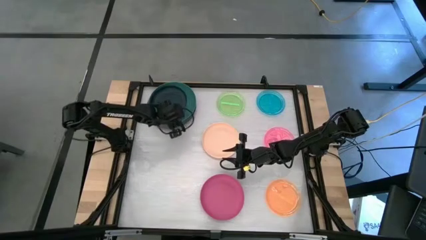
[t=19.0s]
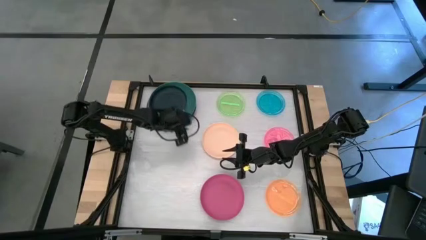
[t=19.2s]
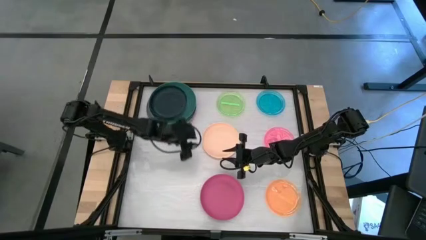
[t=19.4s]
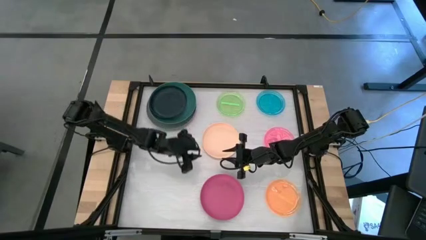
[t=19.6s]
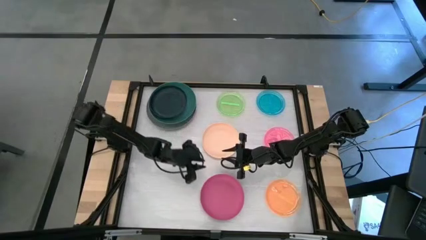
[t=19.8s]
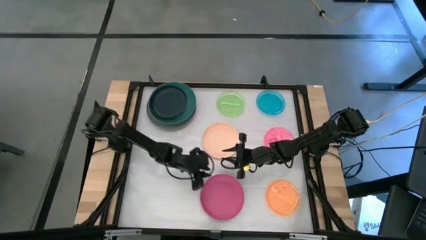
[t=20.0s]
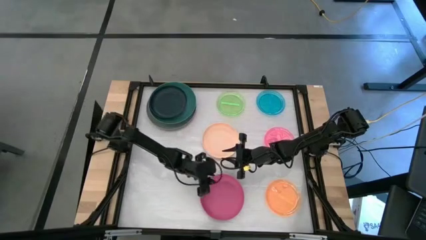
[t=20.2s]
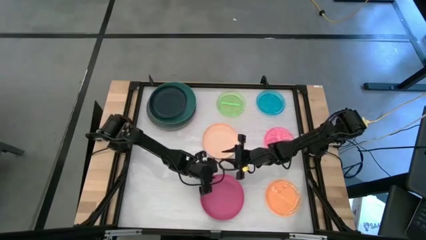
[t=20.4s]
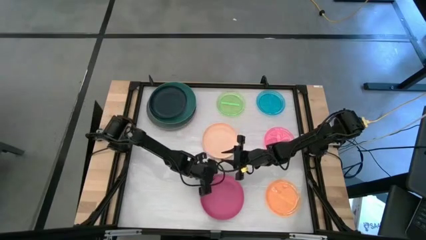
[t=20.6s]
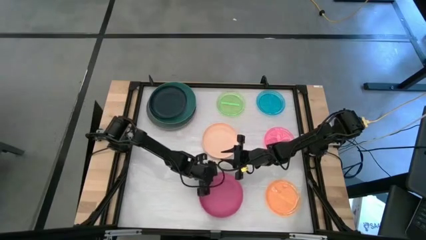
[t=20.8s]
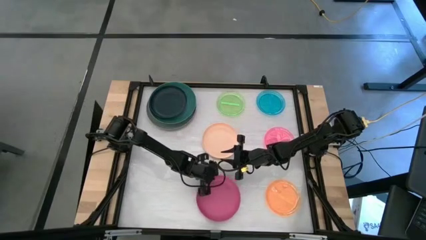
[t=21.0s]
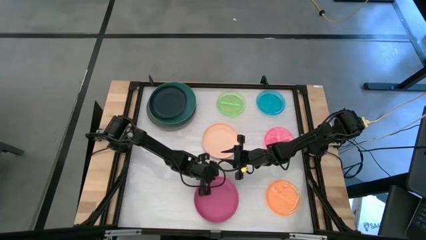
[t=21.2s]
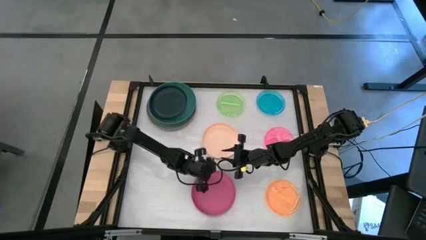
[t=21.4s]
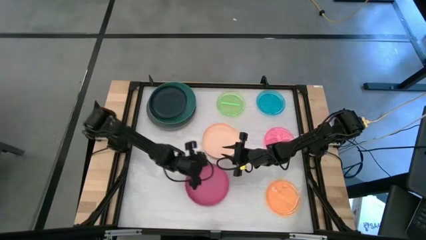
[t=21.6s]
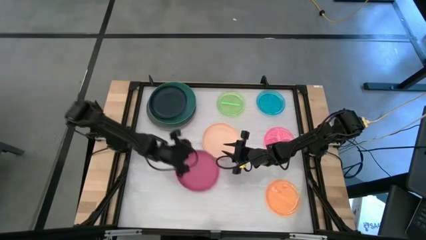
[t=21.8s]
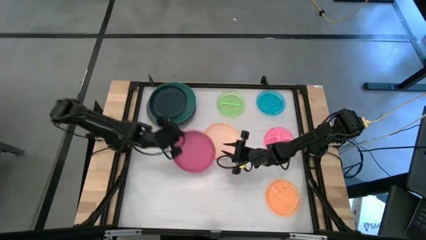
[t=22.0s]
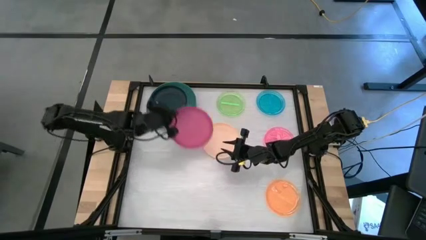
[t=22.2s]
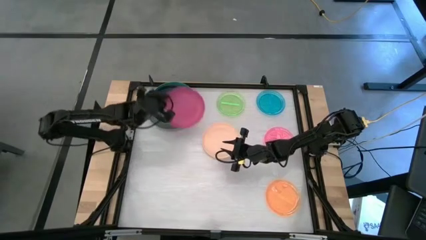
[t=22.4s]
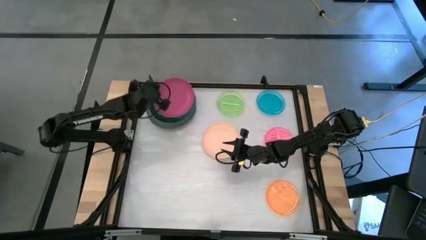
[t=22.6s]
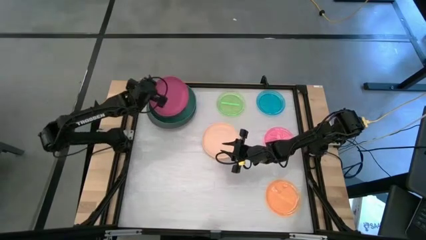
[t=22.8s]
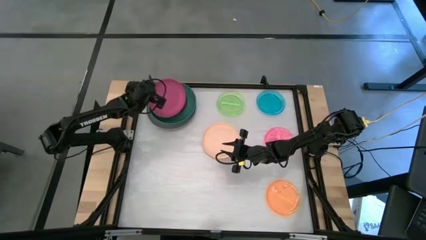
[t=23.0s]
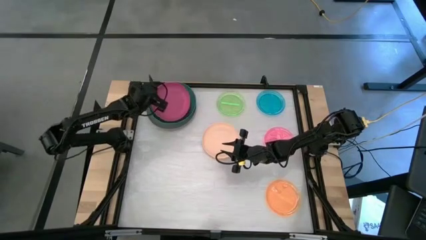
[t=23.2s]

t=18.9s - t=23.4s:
Task: Stack plastic plates
Stack the pink plate on the black plate

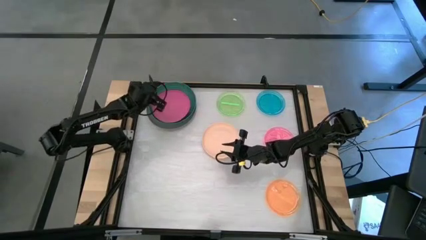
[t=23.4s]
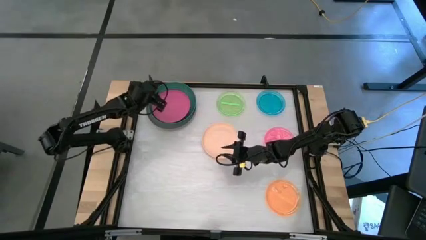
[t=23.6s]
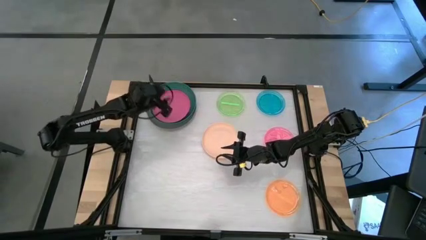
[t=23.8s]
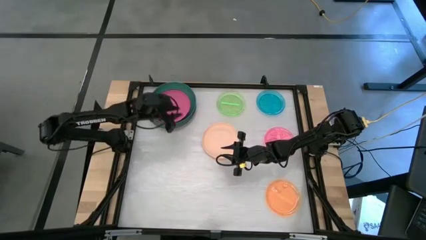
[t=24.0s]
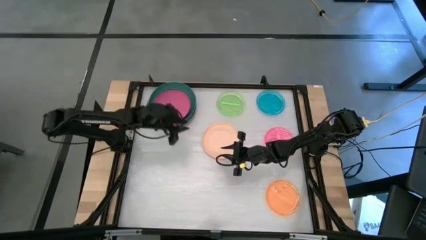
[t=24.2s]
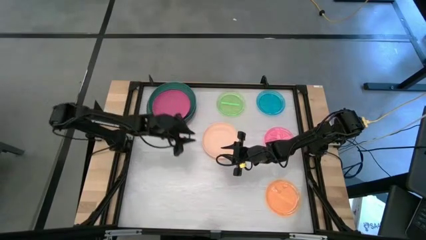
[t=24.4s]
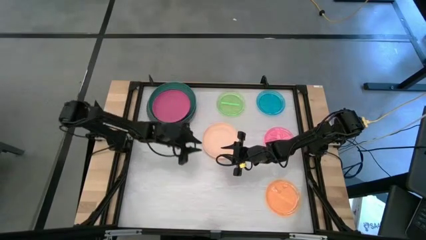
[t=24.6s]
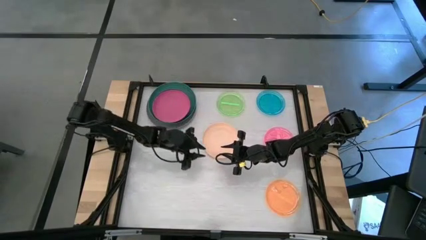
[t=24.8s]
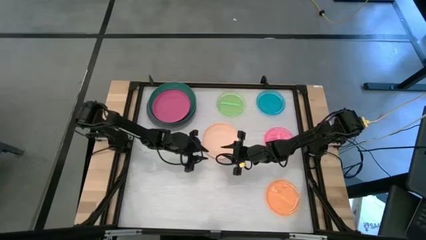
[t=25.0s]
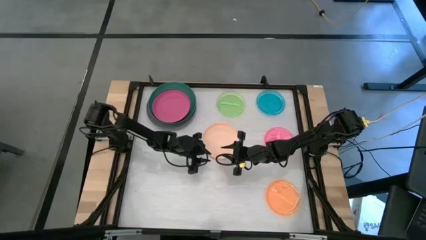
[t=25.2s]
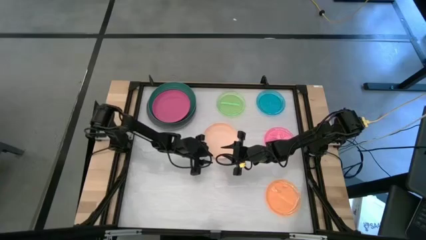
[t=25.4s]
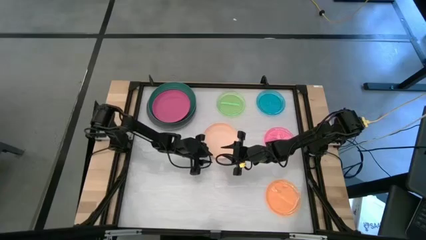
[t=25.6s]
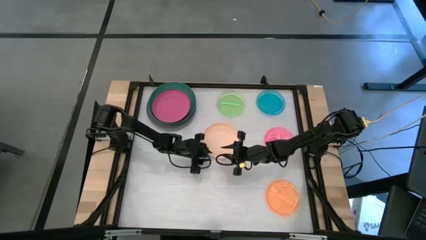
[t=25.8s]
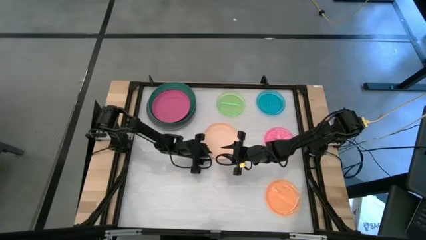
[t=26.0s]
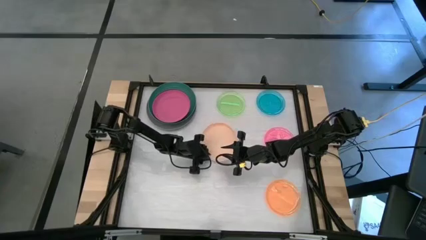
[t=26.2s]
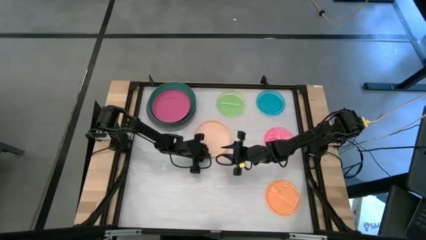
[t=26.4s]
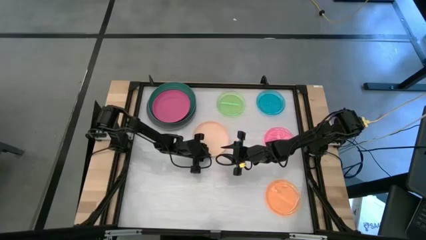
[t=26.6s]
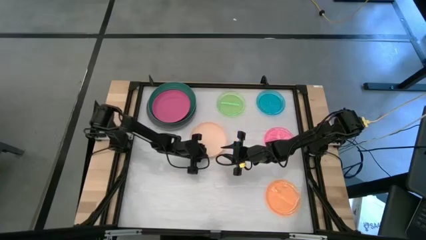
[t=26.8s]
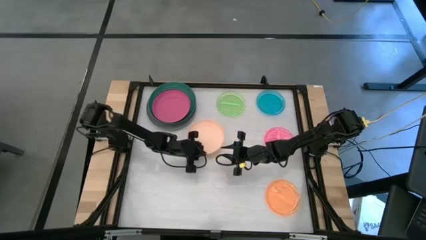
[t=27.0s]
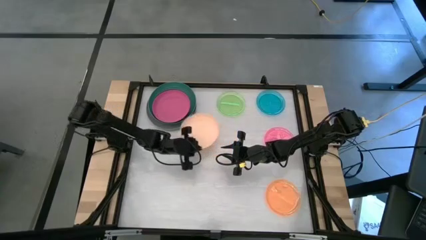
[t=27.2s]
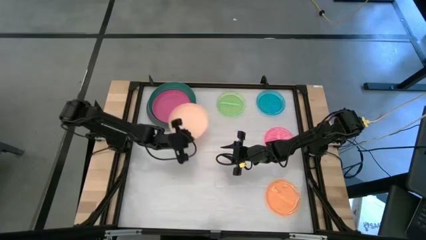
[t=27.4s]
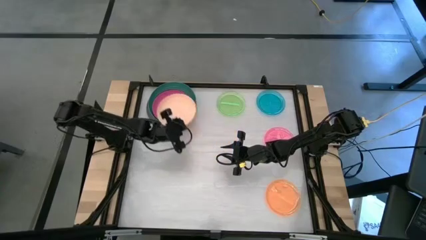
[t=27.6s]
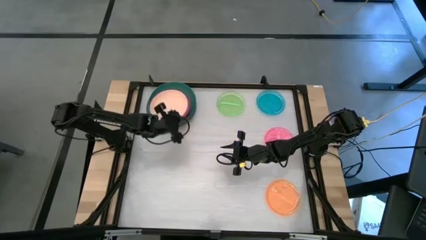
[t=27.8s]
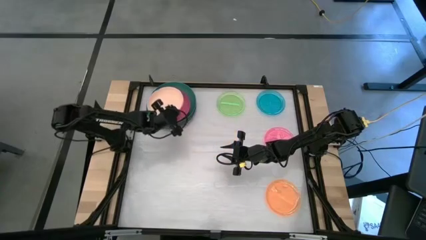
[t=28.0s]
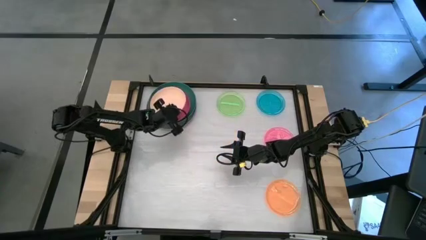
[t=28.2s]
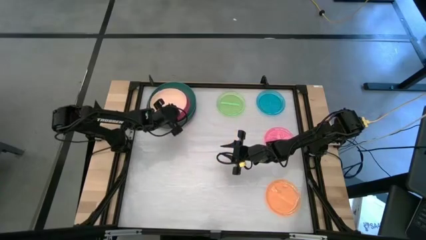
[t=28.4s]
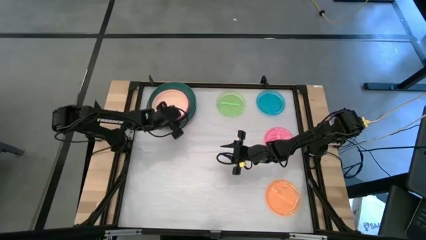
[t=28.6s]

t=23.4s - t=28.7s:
Stack the yellow plate on the pink plate

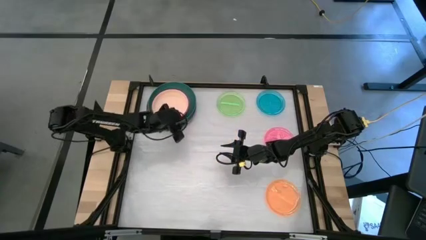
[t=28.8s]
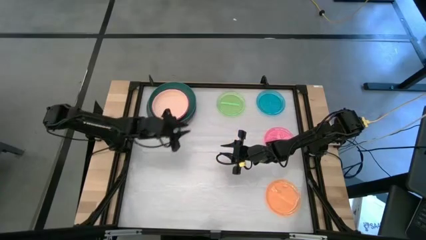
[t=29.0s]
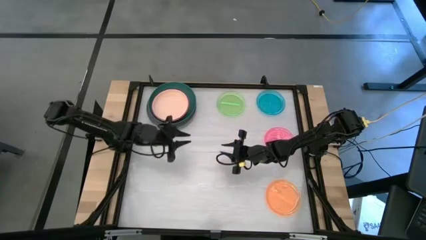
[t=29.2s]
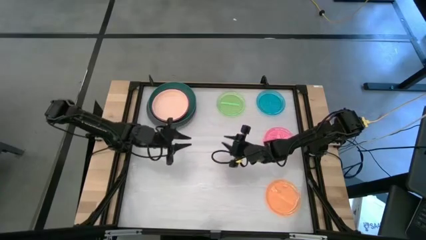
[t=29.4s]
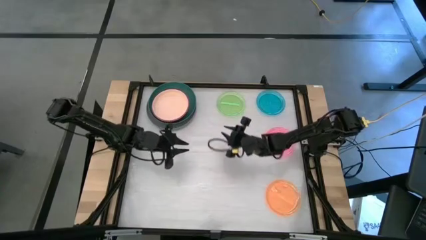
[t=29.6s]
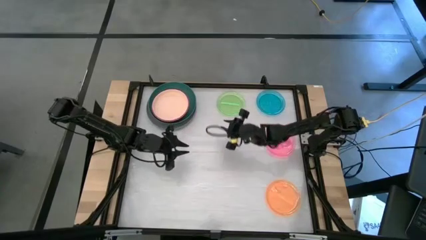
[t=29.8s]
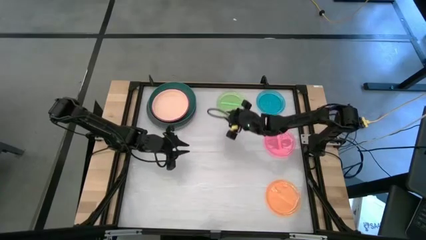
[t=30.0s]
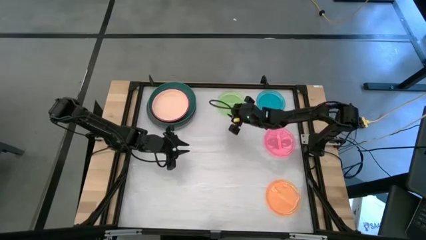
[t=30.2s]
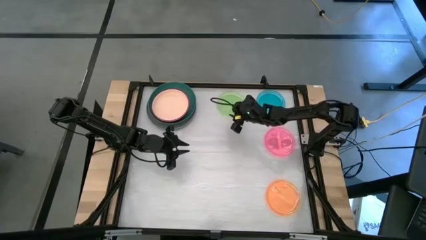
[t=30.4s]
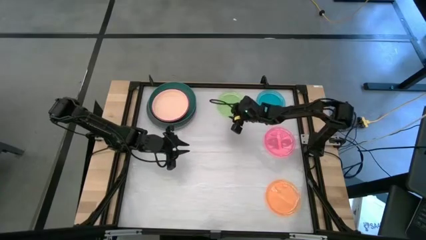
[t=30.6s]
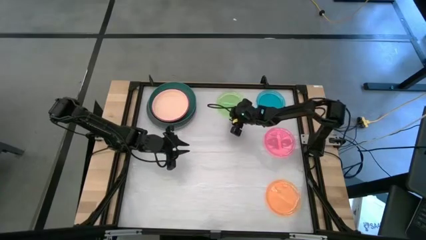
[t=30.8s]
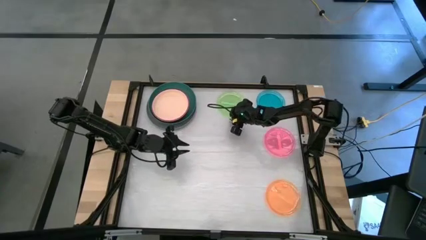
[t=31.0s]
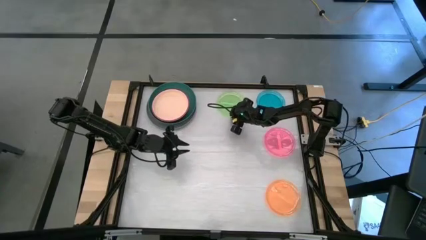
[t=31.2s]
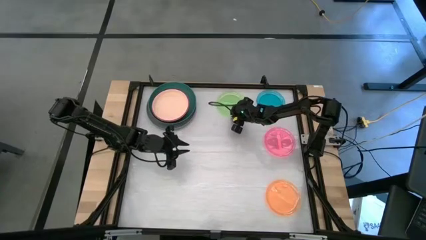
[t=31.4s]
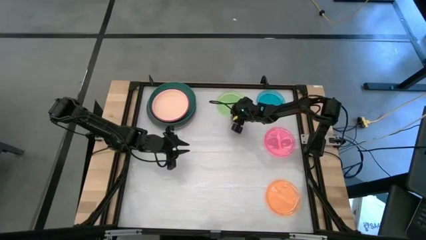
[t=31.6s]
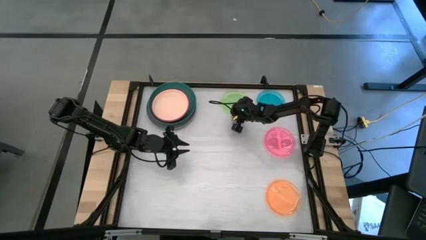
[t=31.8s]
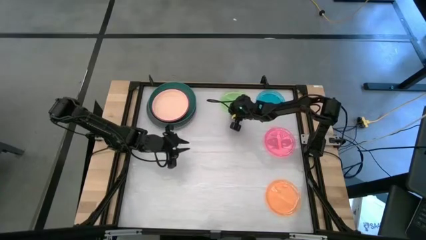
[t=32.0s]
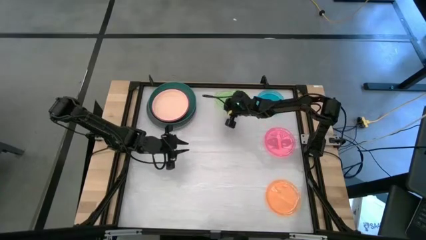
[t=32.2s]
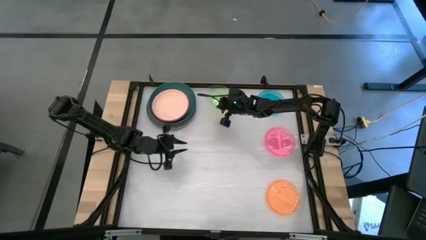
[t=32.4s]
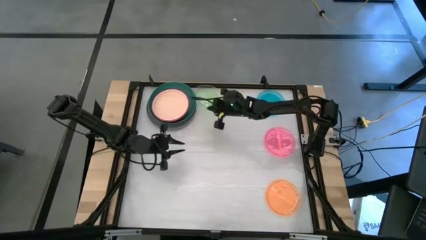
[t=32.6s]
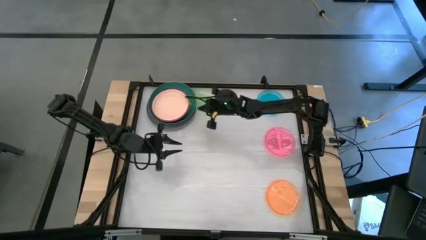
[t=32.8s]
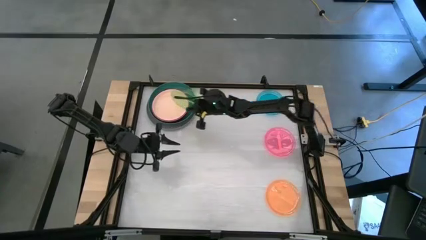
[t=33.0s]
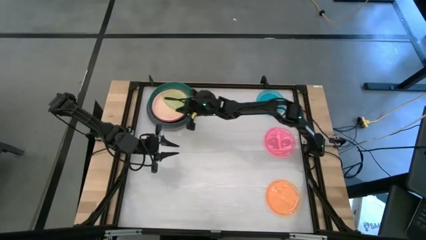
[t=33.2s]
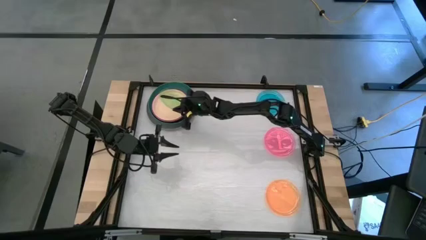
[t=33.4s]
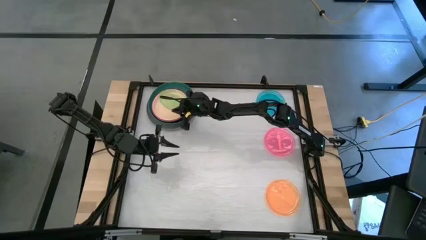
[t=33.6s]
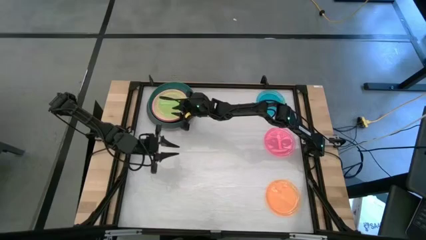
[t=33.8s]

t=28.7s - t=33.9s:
Stack the light green plate on the yellow plate
